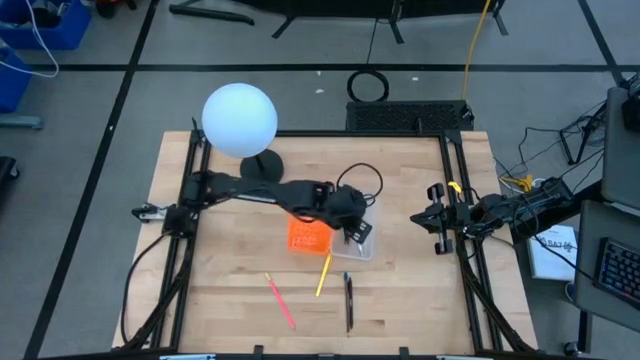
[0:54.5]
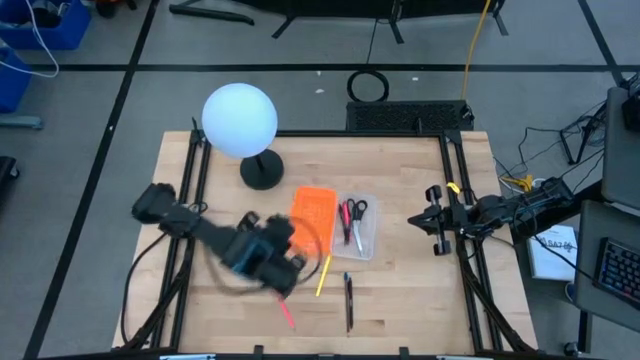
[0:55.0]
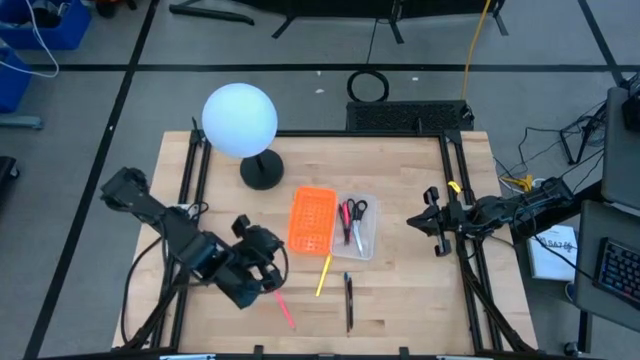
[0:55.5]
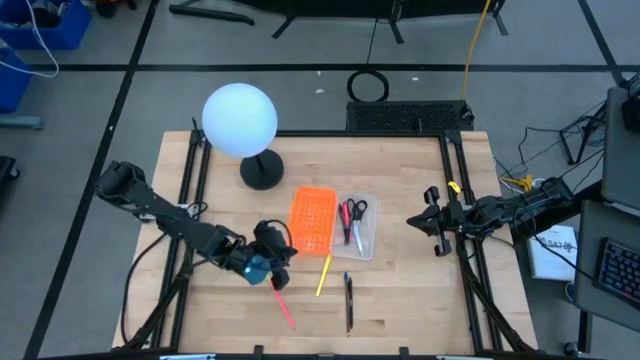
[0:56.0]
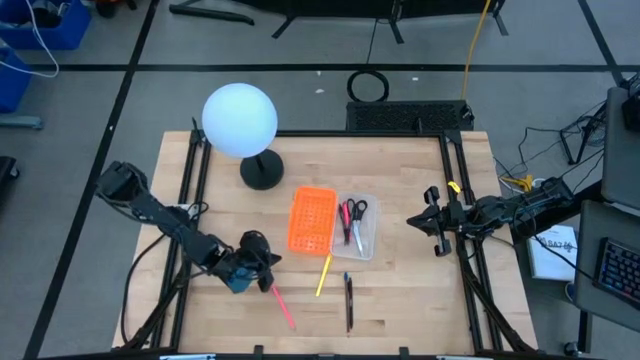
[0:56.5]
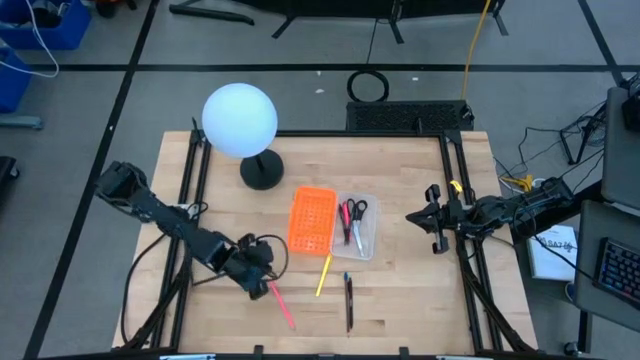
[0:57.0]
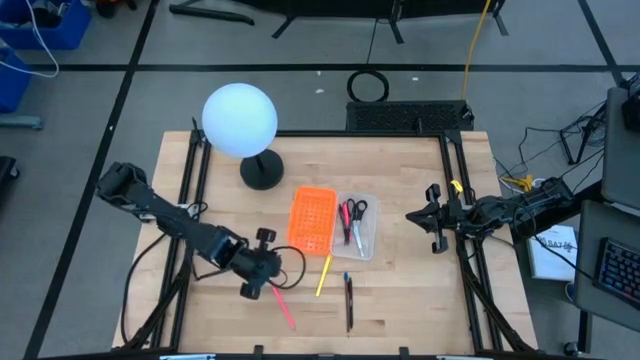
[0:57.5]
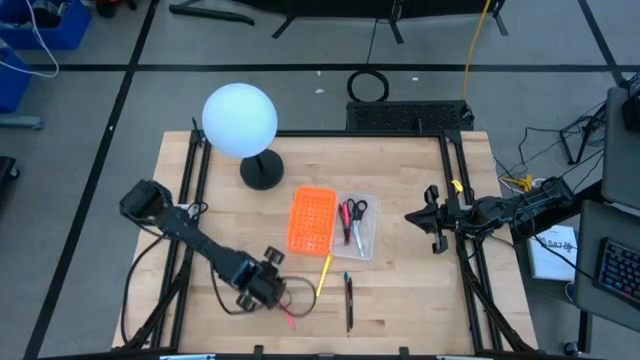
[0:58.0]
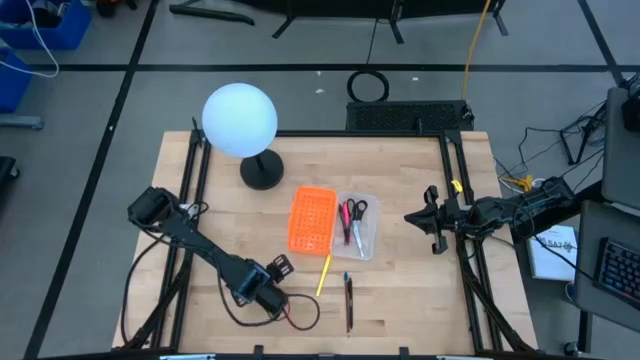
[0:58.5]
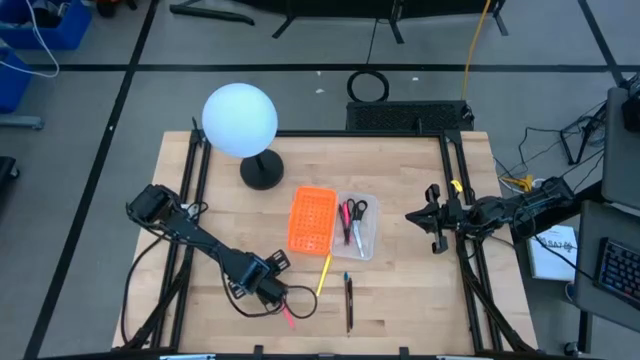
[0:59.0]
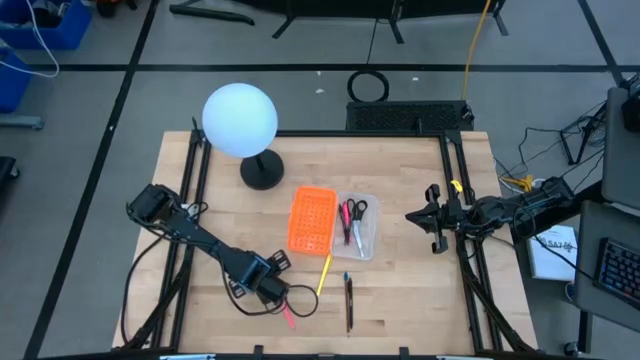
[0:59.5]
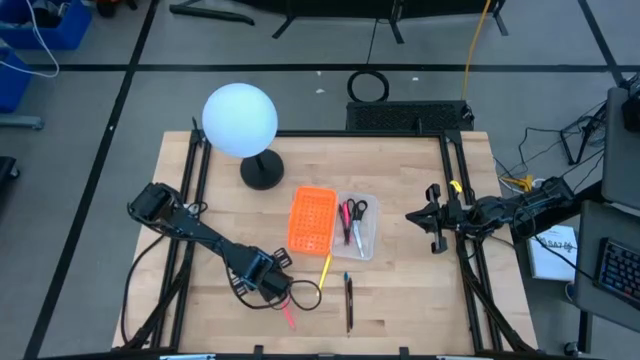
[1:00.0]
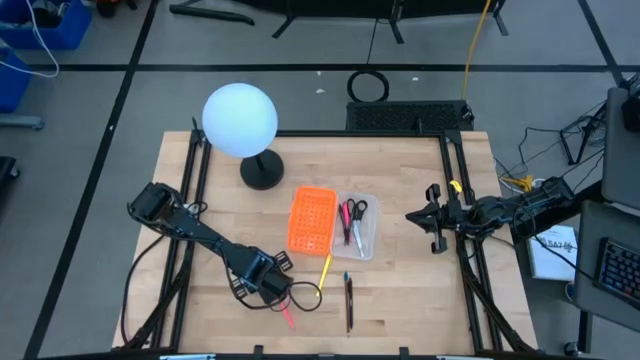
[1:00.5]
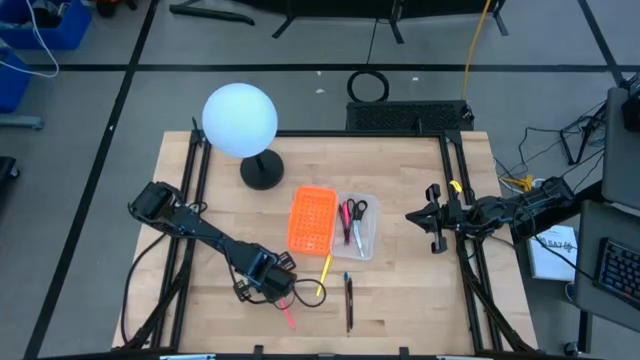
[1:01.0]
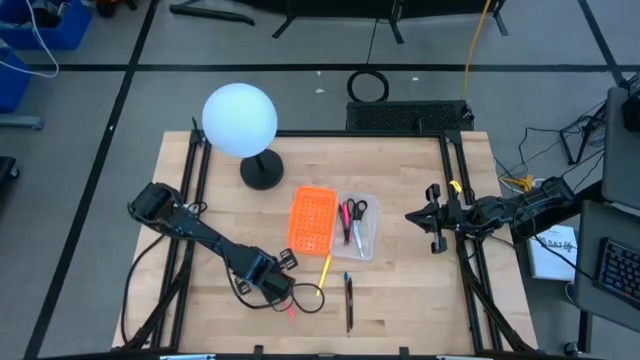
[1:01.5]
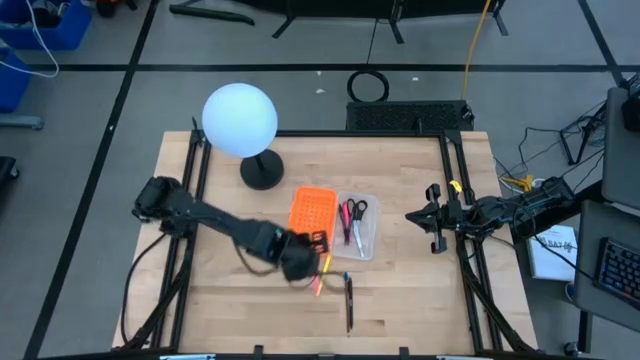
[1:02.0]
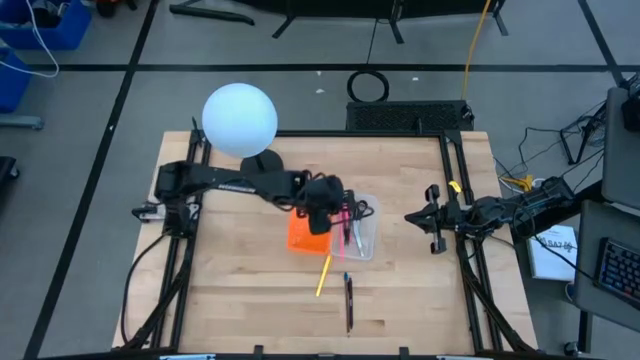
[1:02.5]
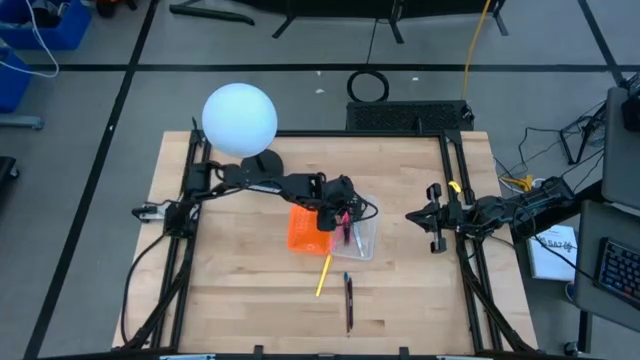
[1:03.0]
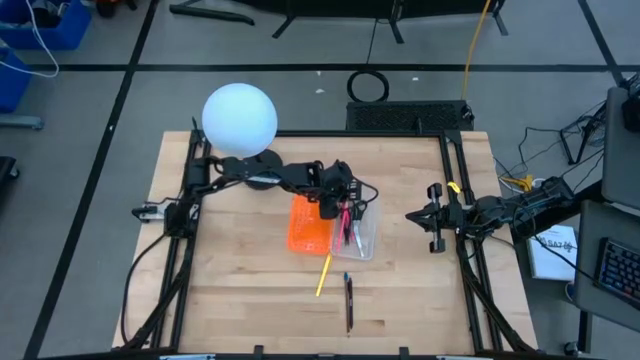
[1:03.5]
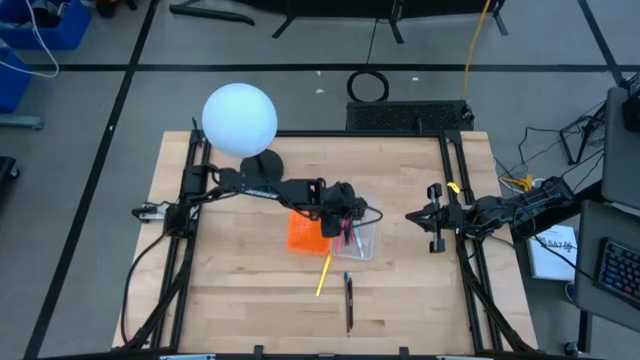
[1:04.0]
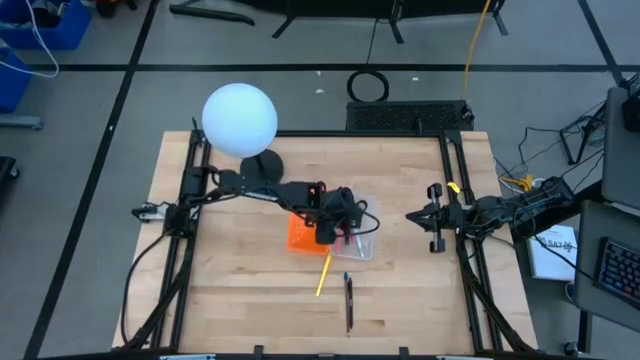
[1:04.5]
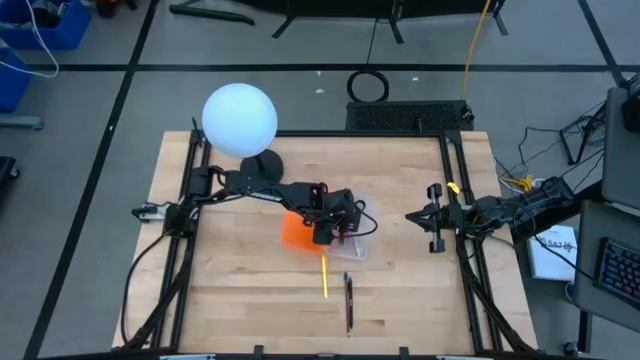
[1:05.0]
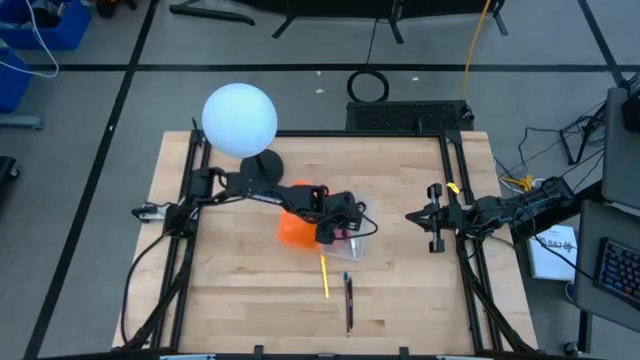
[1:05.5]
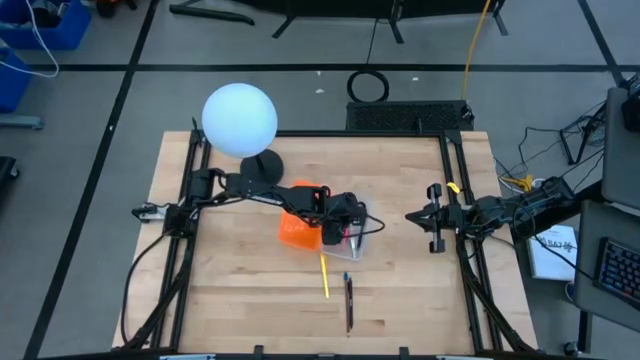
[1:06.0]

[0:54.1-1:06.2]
Task: Pick & place school supplies into a supply box
Put the pink pencil into the orange supply box

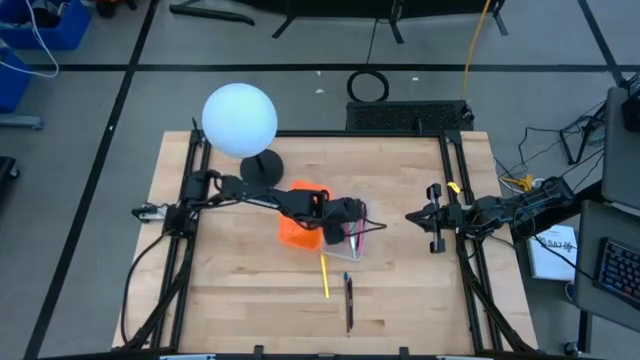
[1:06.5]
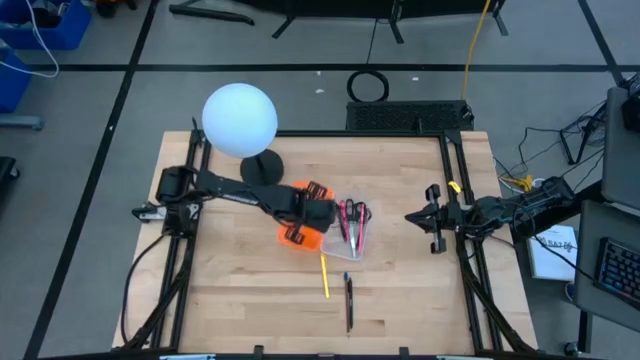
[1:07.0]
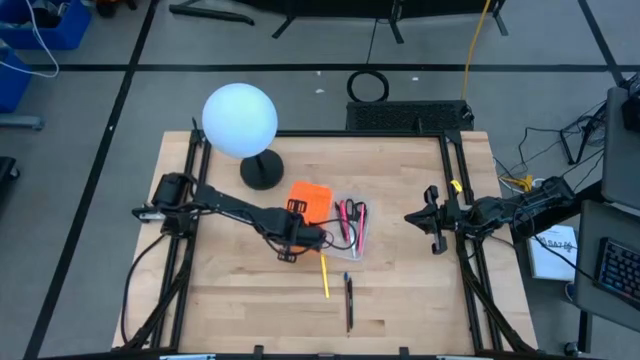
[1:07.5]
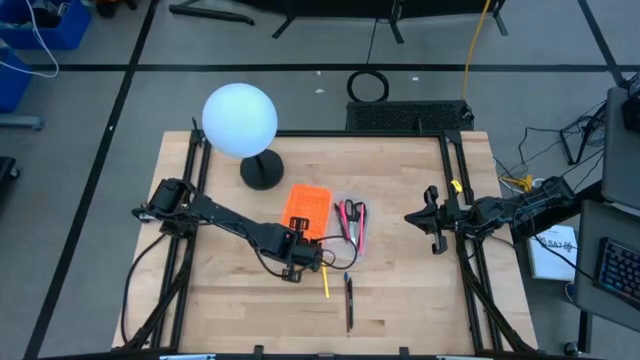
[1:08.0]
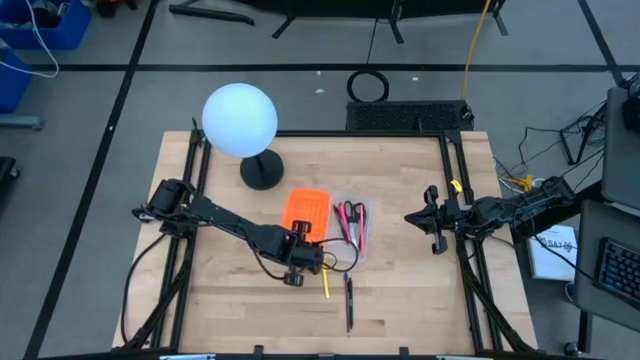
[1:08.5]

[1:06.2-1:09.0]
Adjust the orange supply box

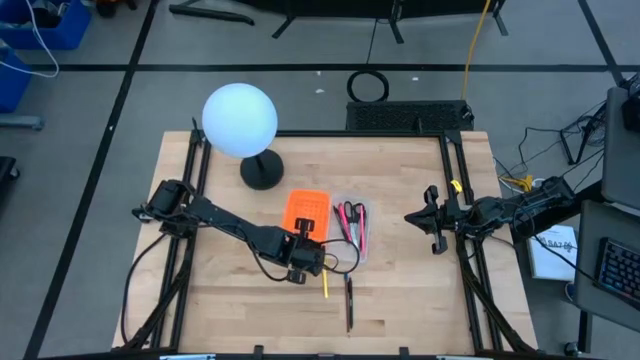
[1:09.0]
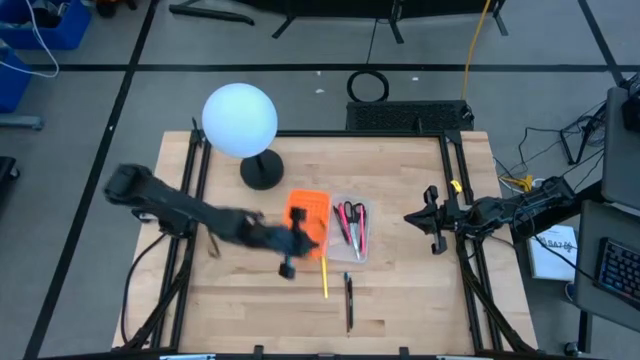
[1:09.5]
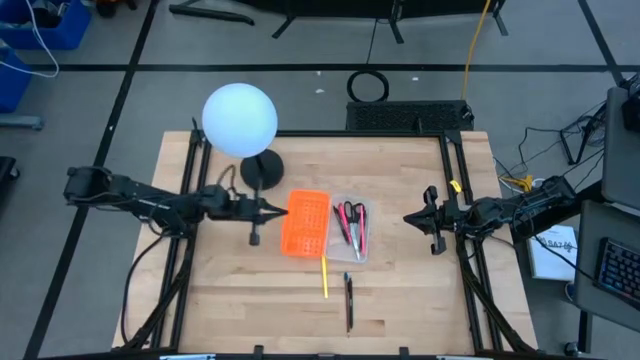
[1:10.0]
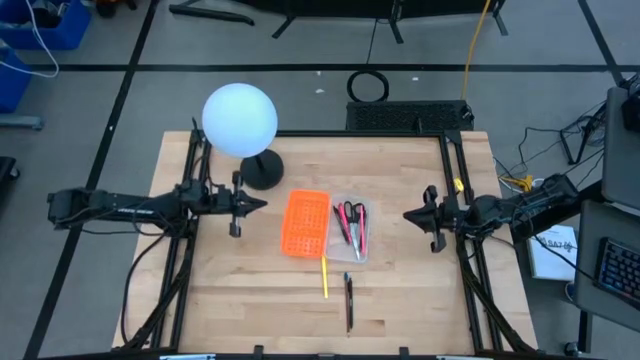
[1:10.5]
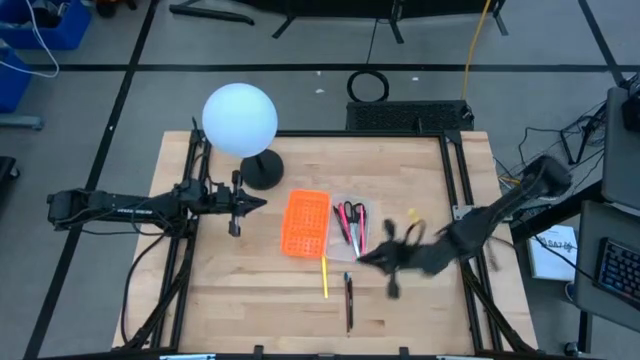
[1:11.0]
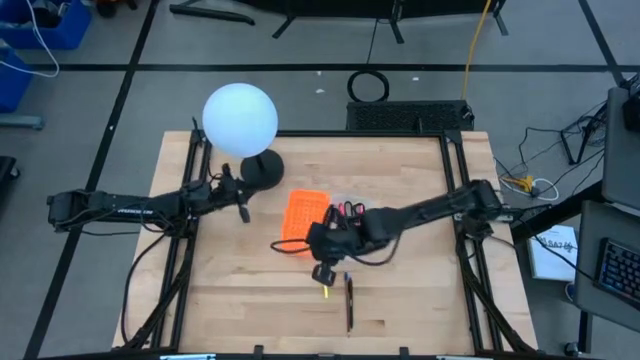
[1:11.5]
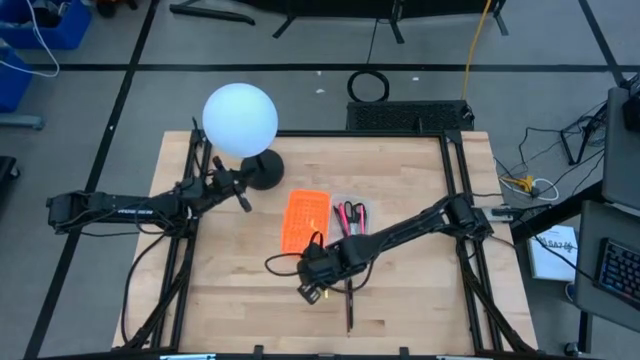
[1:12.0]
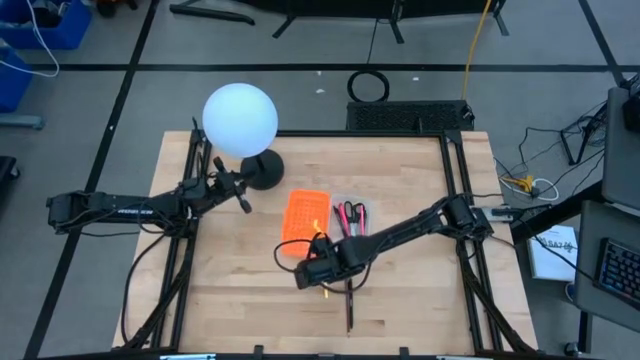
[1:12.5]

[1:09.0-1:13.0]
Put the yellow pen into the orange supply box

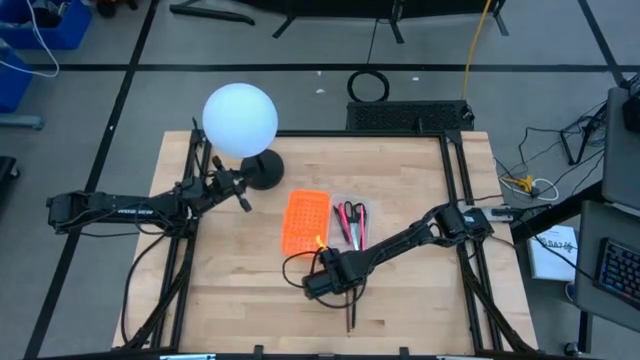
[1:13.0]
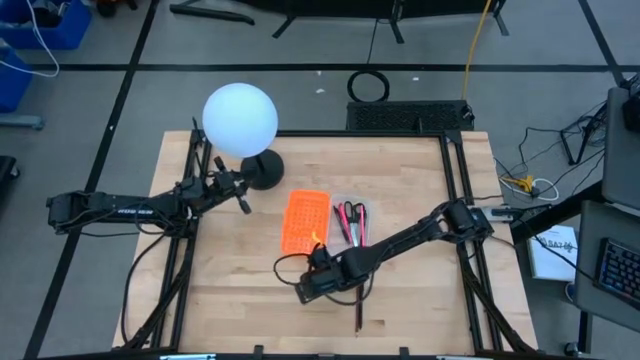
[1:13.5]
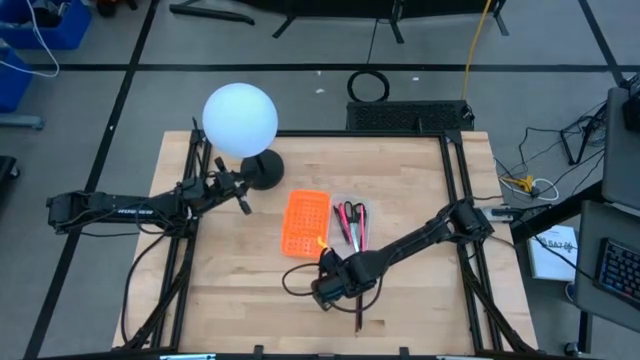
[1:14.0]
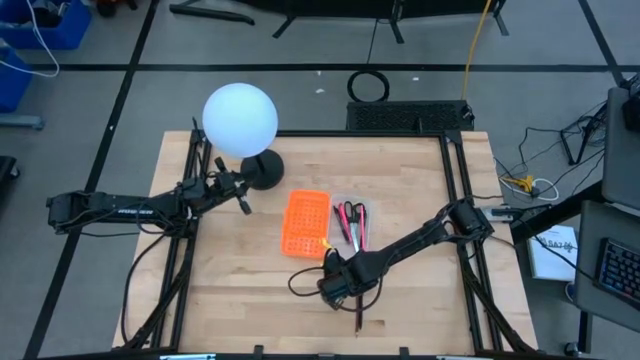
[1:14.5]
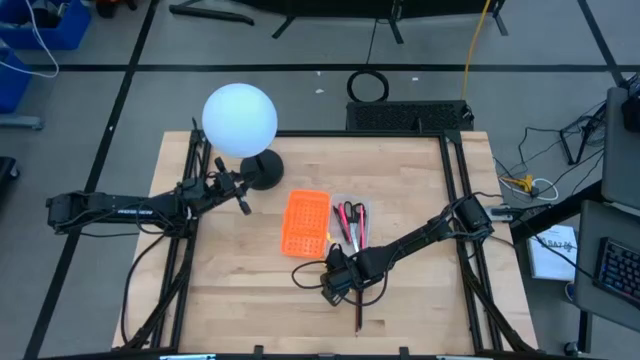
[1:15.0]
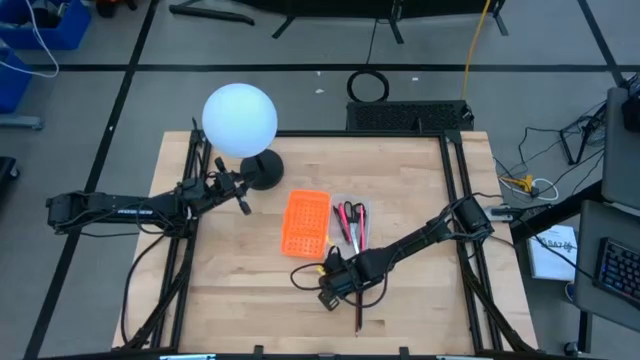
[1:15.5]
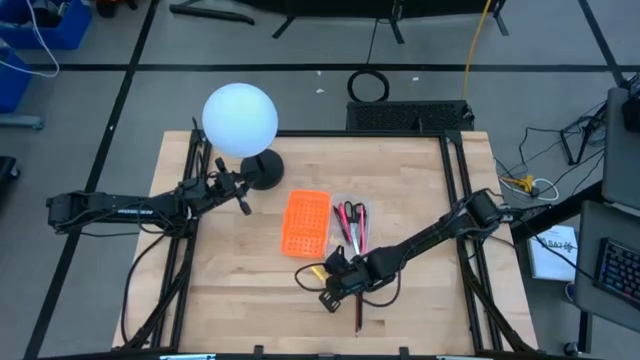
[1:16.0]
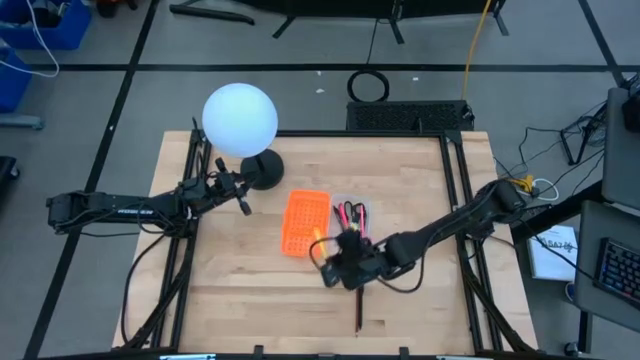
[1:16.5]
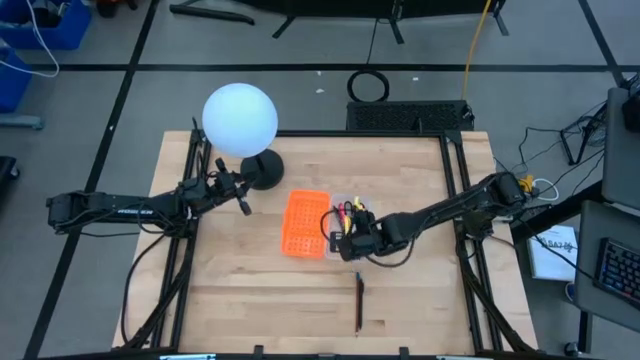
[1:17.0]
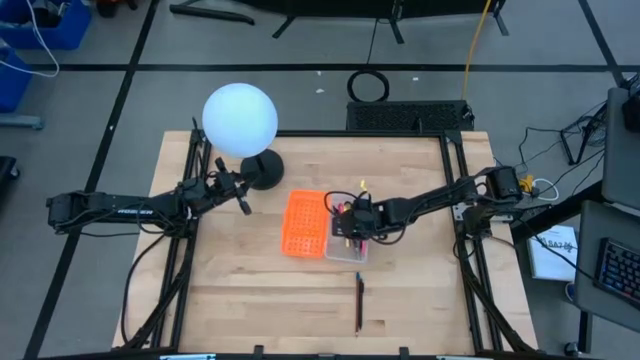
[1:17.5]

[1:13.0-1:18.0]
Put the yellow pen into the orange supply box
